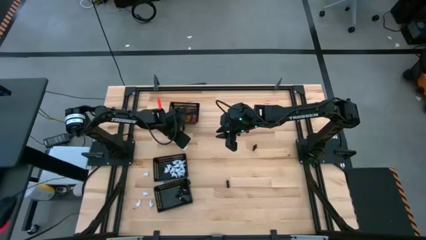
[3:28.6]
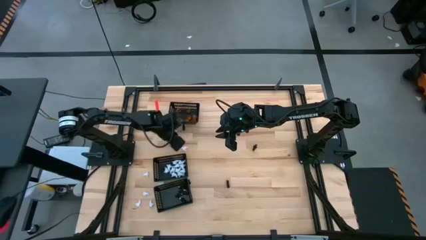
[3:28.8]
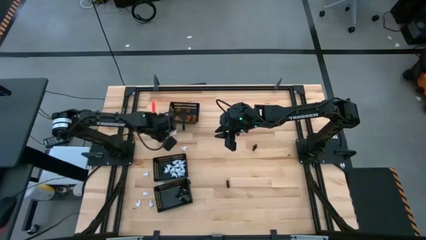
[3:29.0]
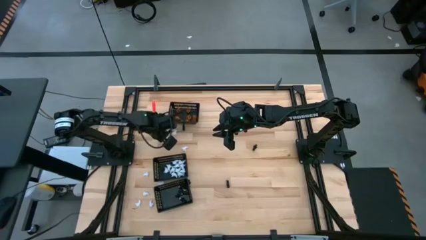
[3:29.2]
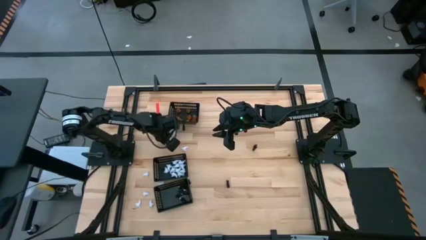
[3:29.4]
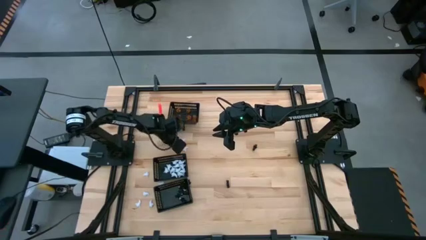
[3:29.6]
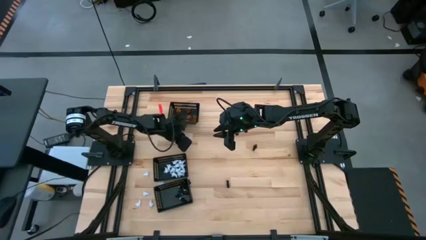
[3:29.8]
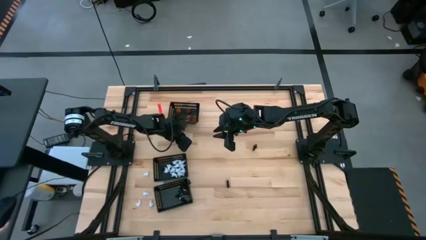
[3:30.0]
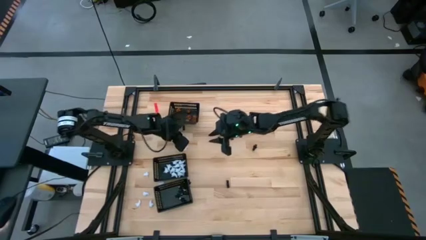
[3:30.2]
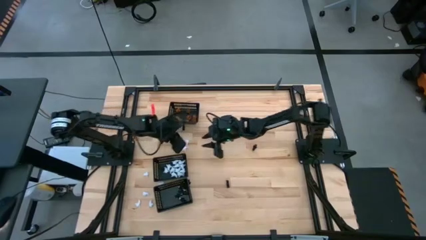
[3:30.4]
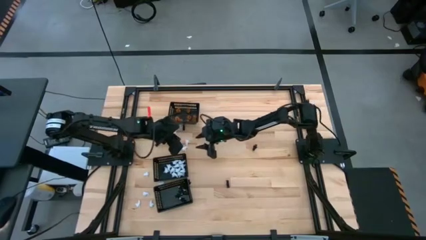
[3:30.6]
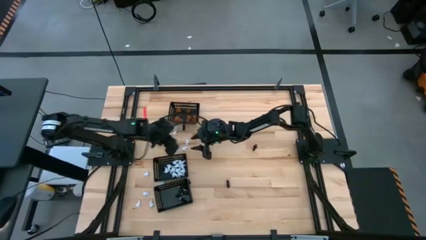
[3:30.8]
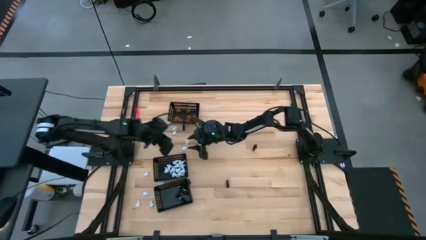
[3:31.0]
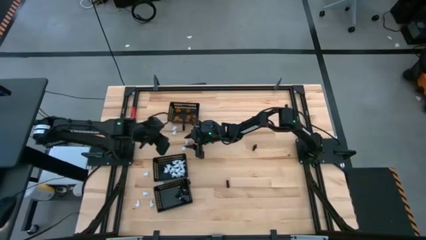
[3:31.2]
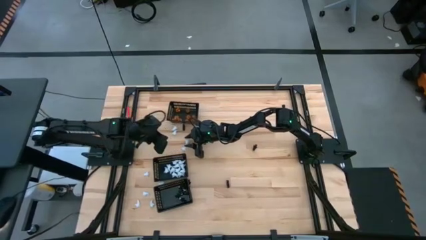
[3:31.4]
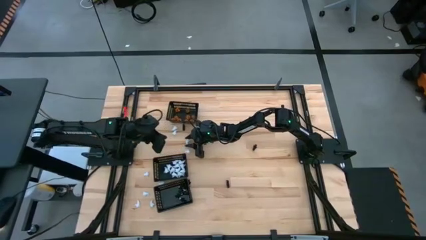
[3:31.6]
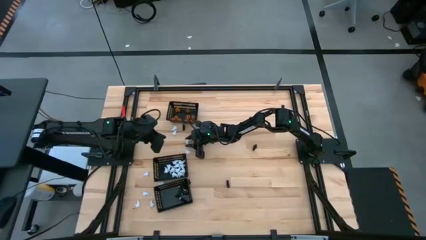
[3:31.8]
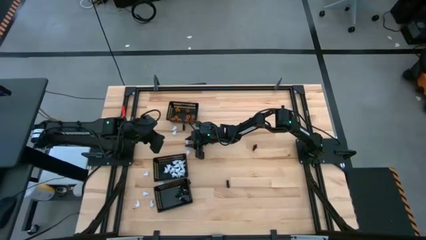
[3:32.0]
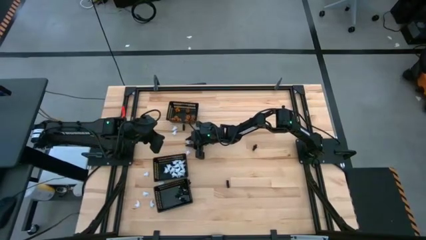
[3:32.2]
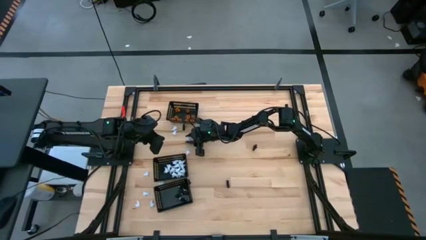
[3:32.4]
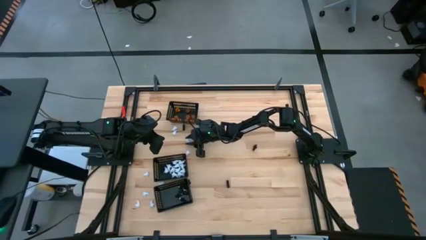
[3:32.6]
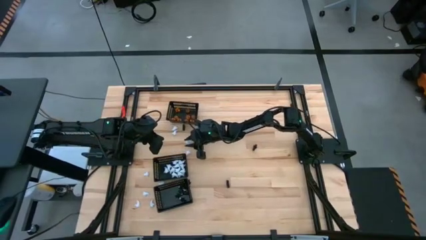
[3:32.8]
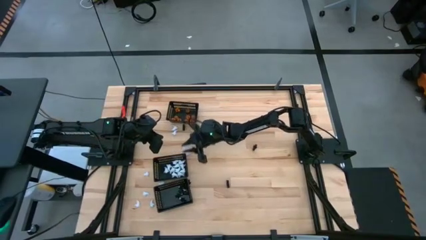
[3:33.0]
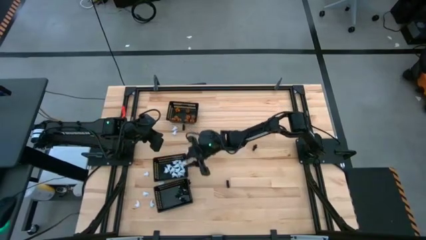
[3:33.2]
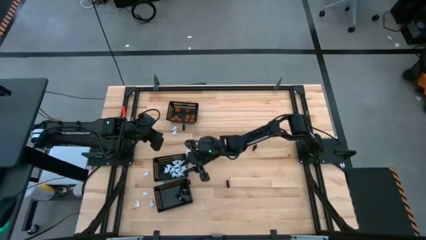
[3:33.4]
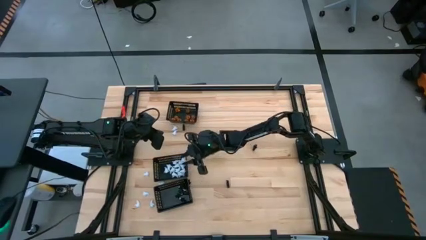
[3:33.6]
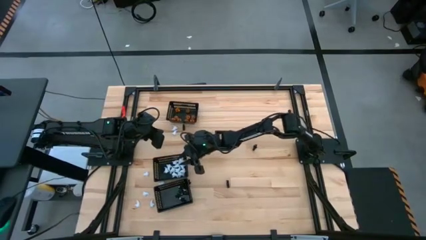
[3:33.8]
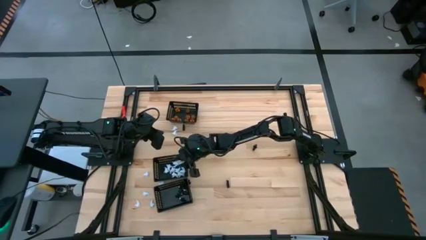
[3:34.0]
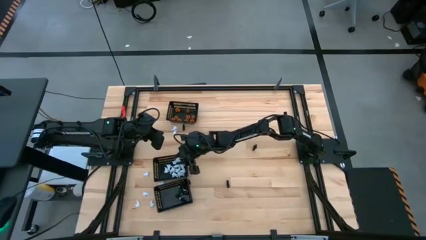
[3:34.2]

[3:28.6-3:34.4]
Task: Sort Halloween decoration
Put the white toy into the middle black bin

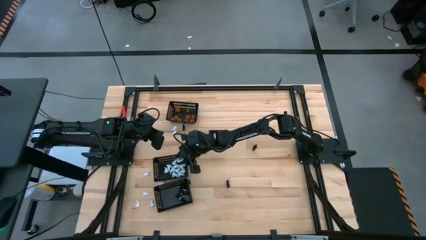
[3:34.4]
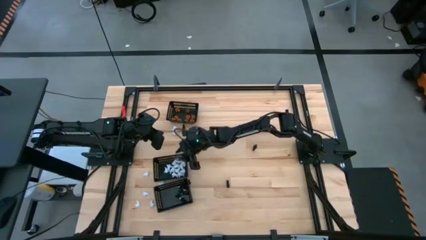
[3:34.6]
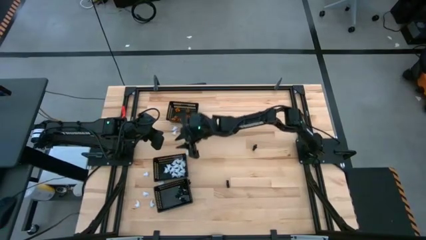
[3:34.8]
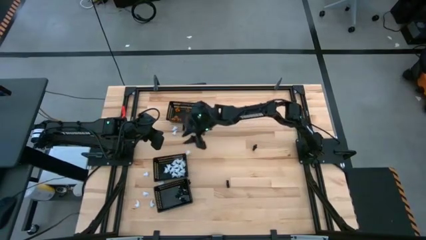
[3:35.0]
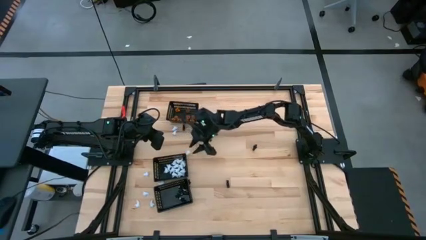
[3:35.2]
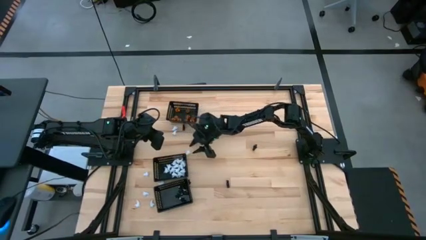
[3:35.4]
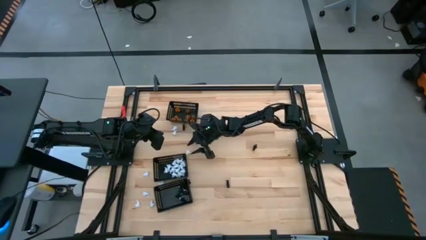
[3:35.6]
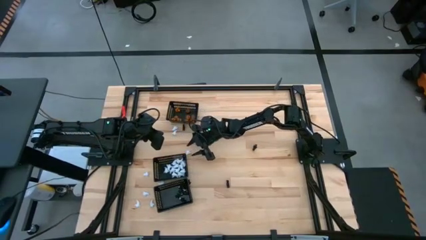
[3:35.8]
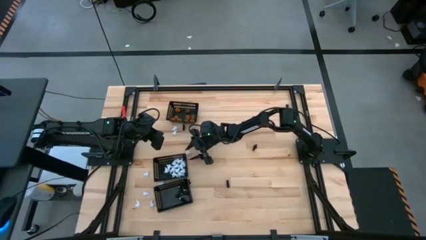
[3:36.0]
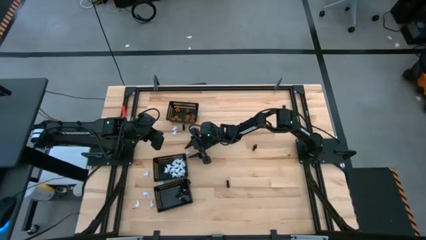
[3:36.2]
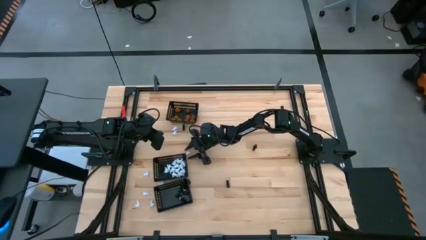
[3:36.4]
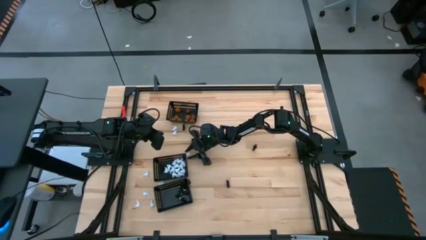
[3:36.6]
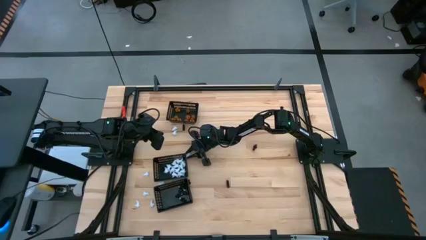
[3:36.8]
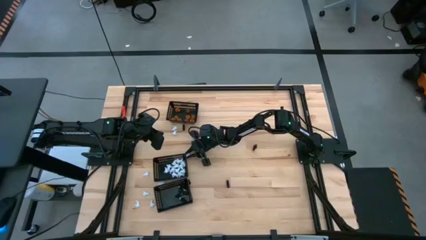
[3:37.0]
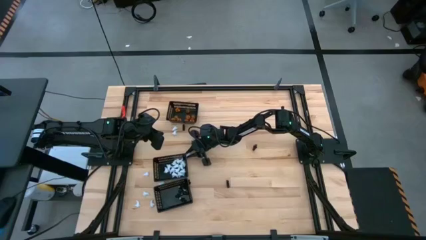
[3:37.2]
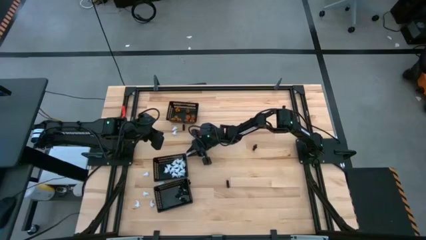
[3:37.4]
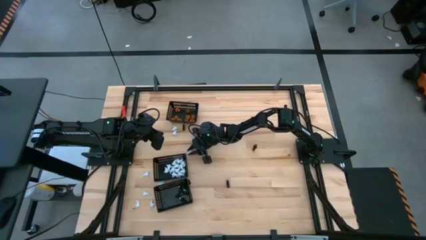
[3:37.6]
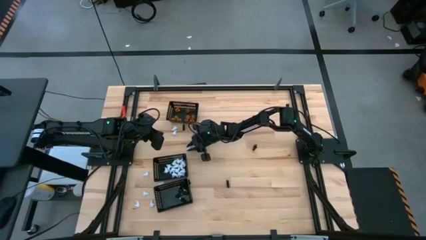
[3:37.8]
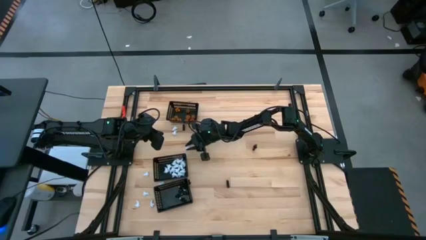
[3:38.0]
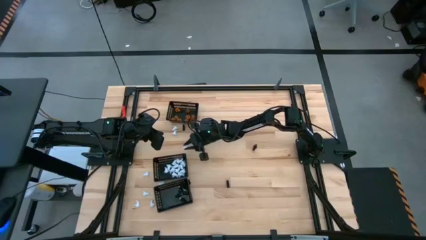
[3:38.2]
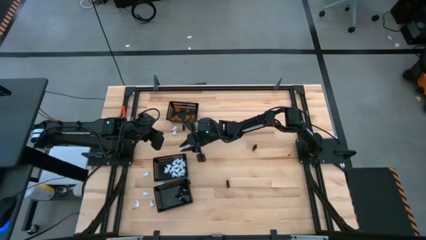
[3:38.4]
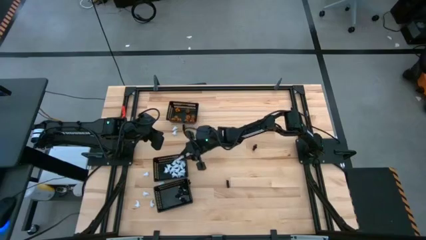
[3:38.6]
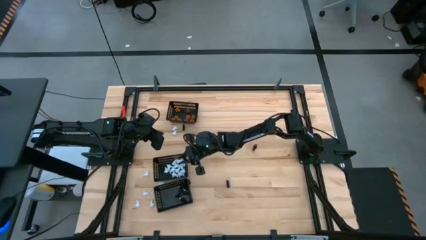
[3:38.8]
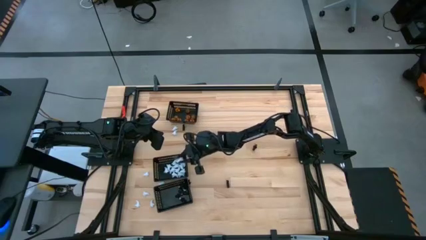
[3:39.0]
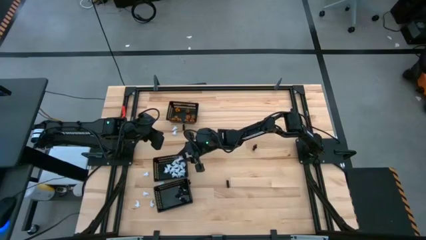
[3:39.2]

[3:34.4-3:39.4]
Put the white toy into the middle black bin

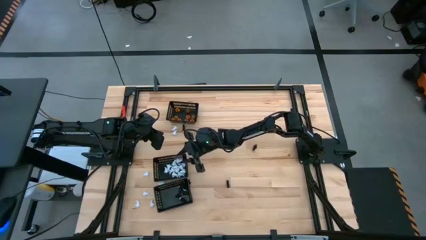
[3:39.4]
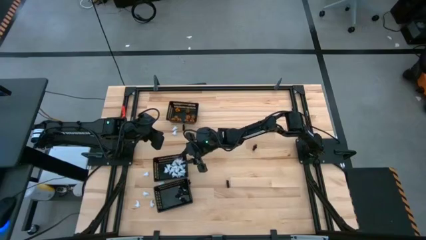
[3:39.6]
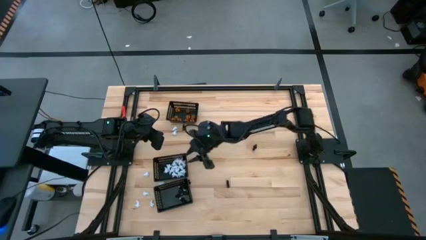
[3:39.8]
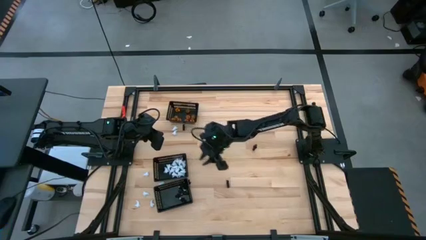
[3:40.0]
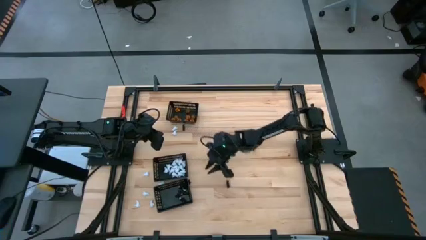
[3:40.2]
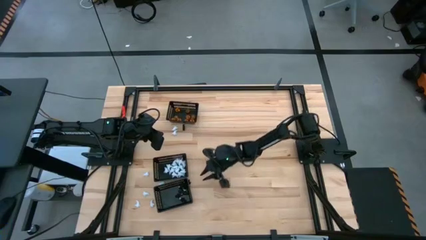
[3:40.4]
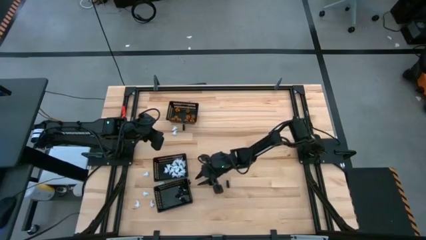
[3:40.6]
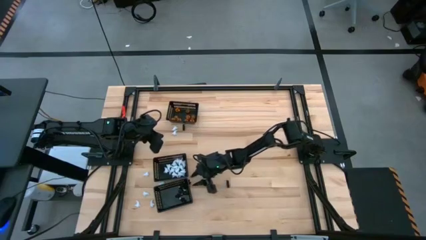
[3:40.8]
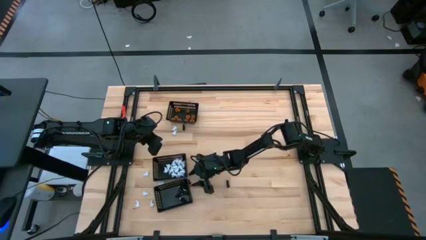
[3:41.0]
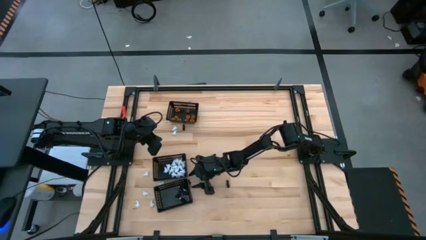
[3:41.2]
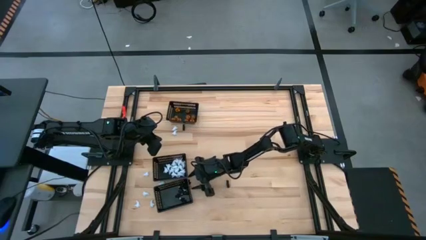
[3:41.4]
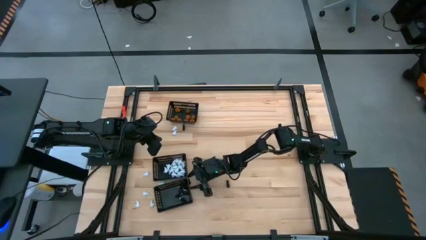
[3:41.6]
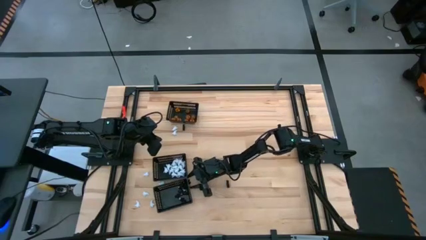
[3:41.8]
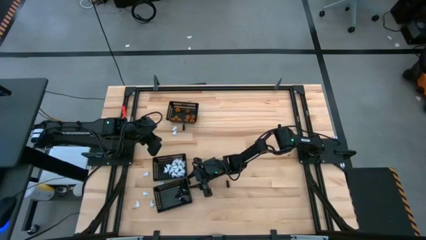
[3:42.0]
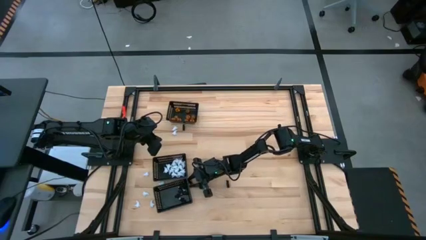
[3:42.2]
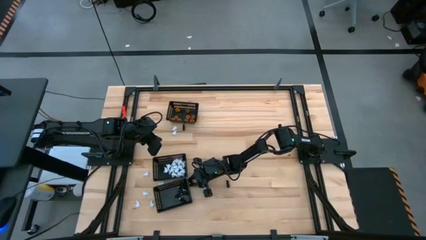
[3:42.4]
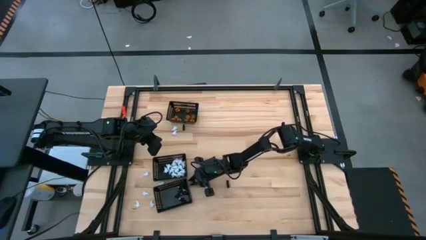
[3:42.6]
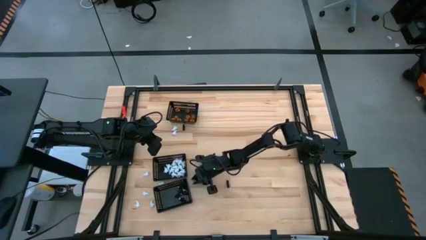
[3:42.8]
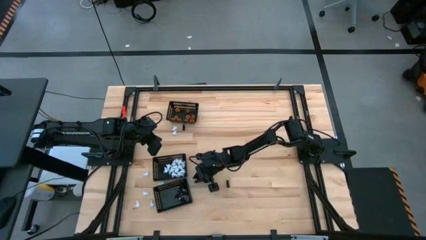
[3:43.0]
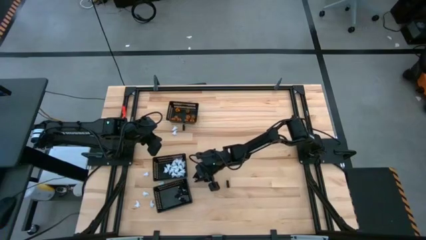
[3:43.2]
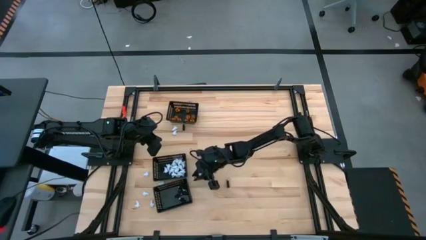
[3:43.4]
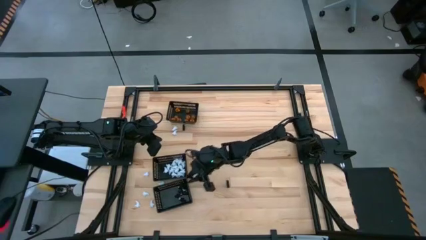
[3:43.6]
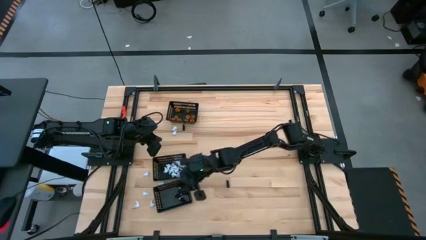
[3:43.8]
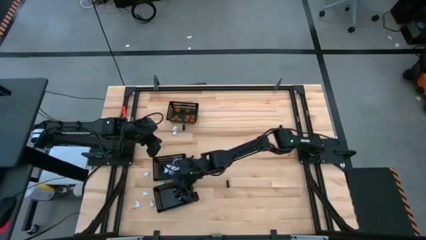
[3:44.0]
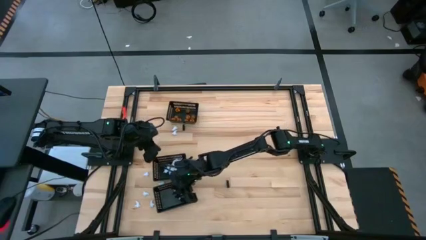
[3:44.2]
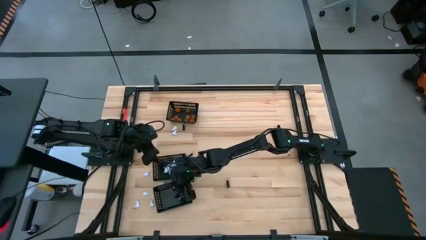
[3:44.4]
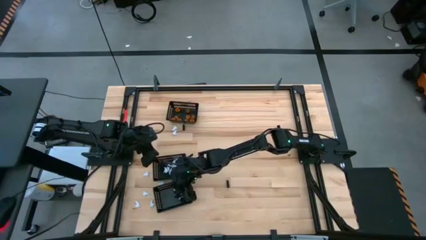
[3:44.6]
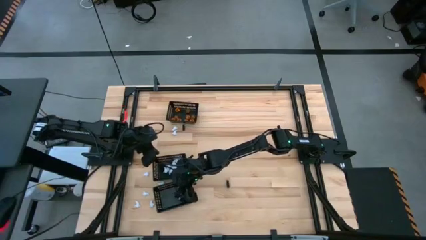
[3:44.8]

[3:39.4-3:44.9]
Put the black skeleton toy into the bottom black bin
